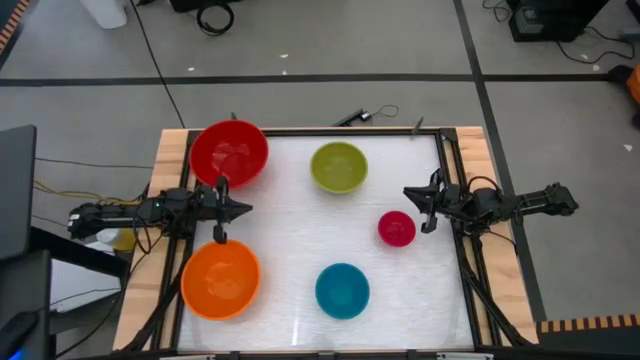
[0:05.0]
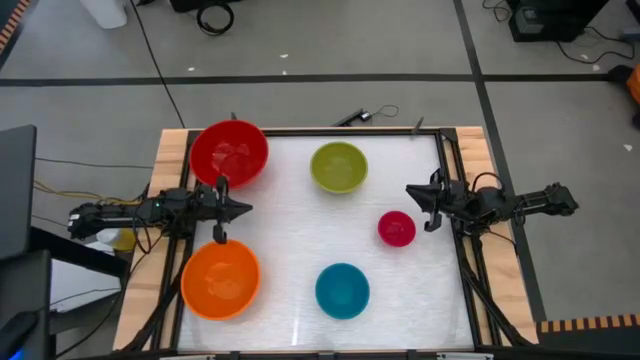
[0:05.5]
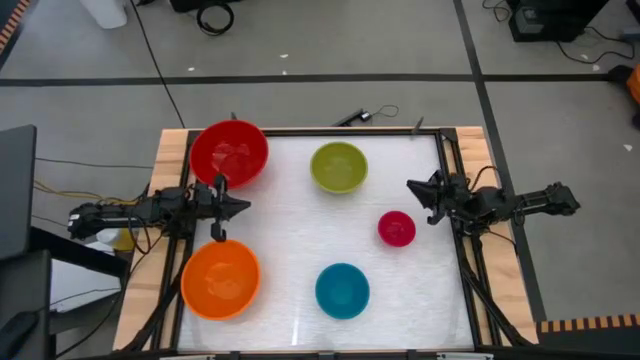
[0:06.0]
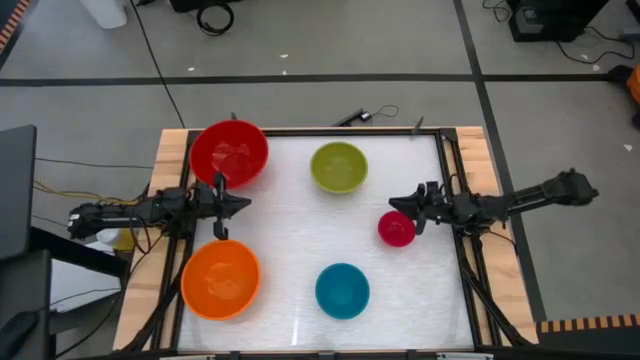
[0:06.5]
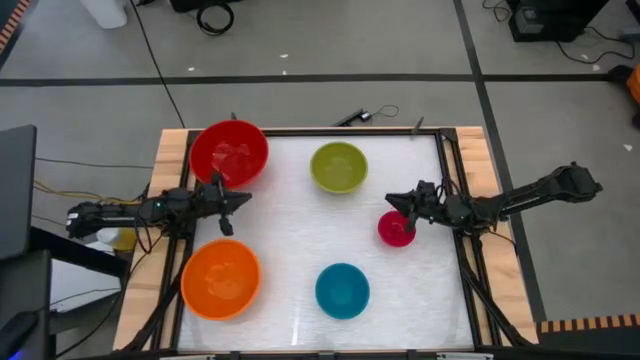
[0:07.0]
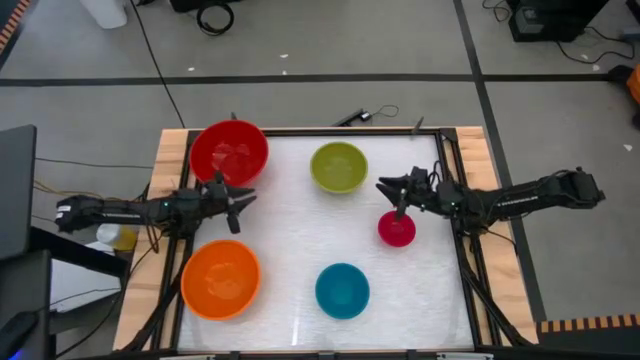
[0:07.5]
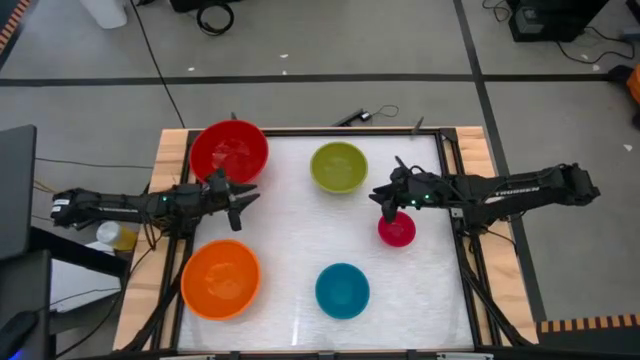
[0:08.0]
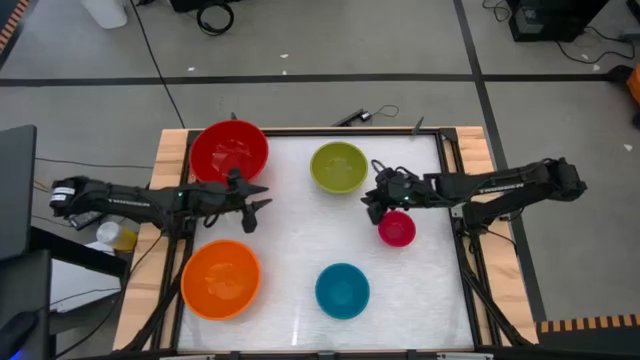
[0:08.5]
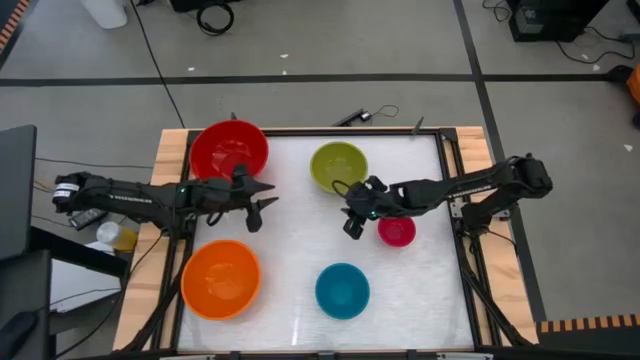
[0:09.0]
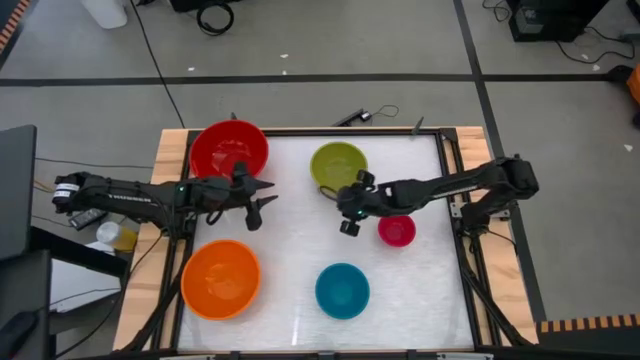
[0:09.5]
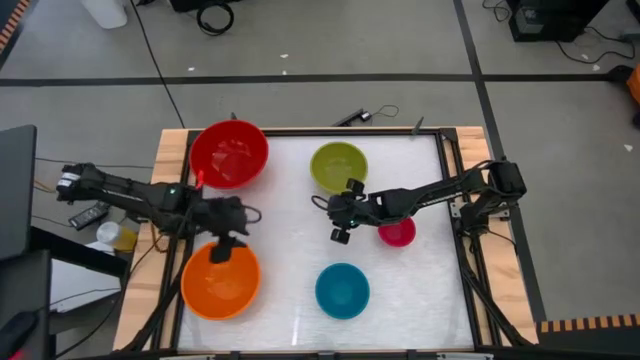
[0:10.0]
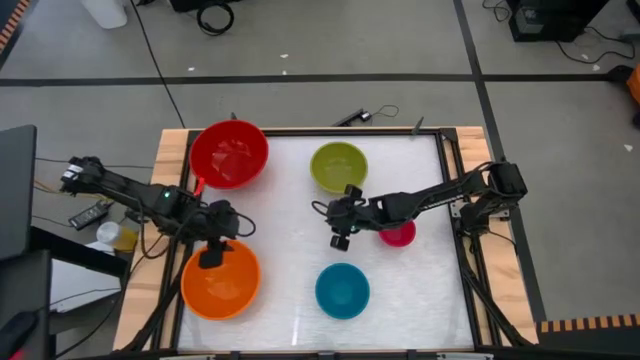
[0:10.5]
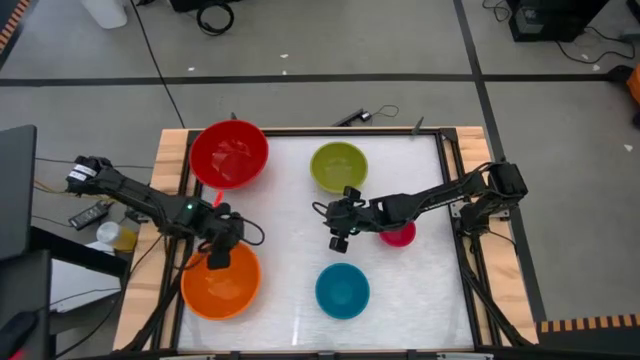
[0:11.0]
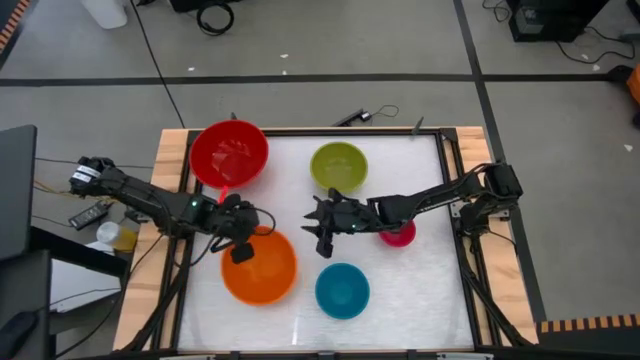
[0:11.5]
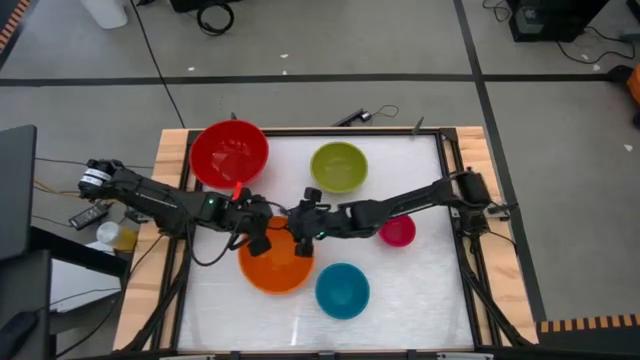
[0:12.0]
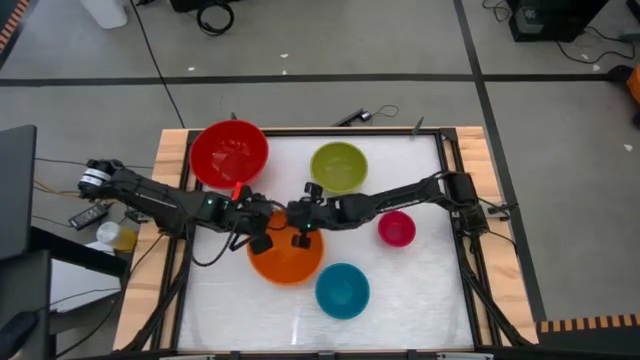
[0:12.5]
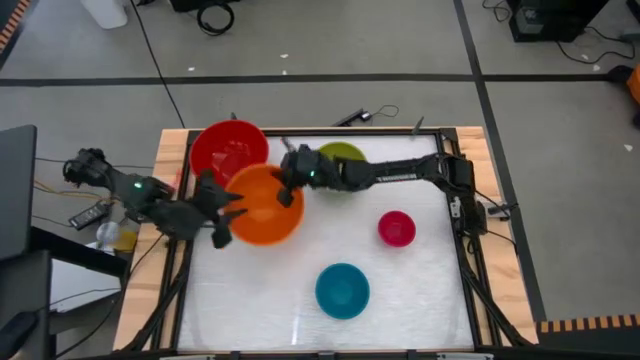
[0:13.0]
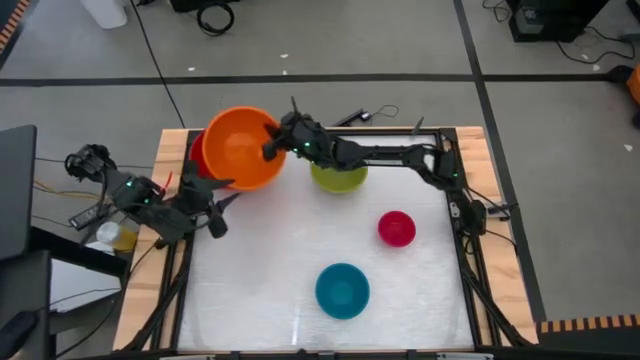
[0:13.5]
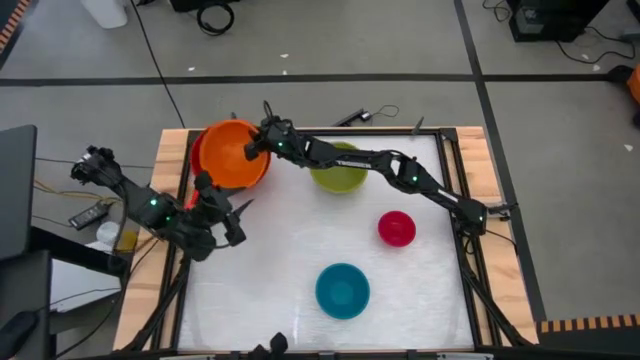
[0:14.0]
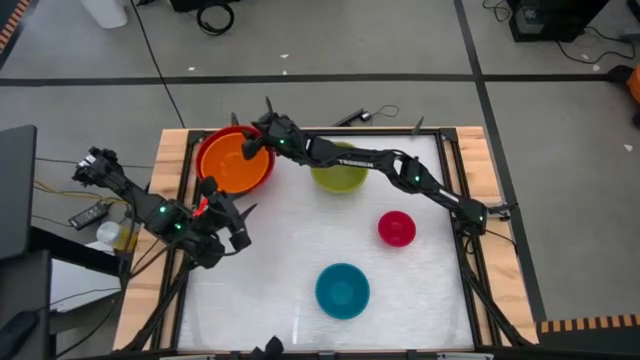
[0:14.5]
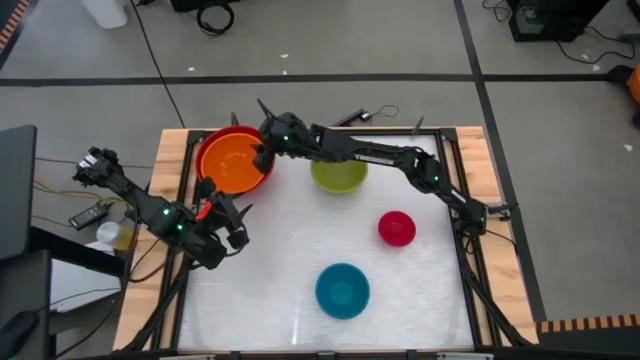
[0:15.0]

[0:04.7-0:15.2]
Stack the orange bowl into the red bowl

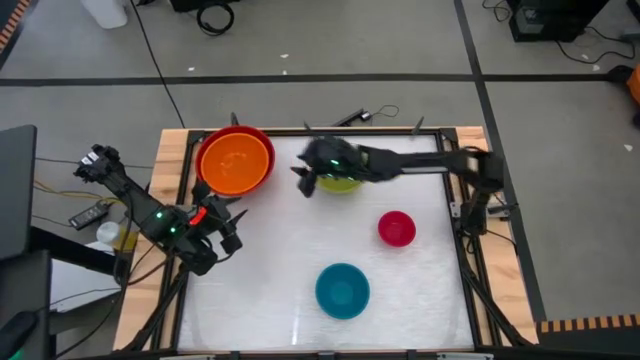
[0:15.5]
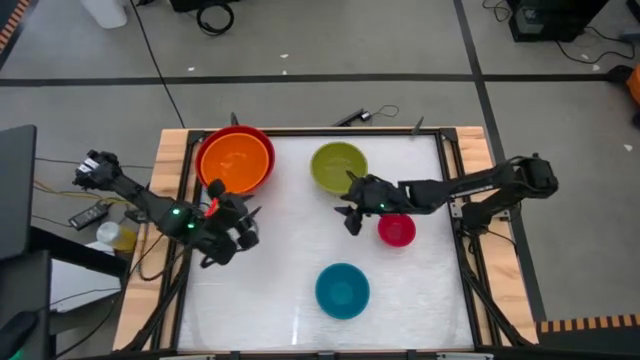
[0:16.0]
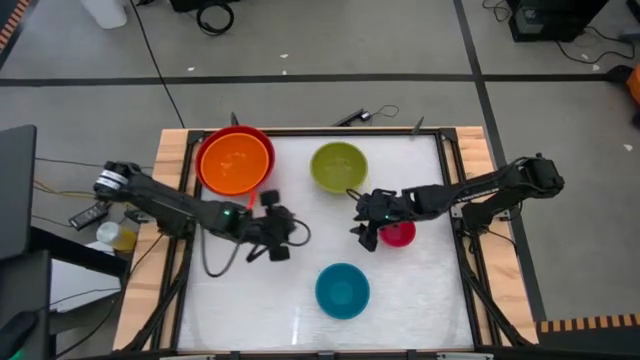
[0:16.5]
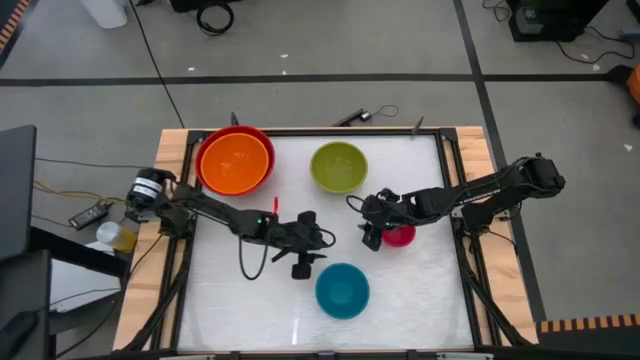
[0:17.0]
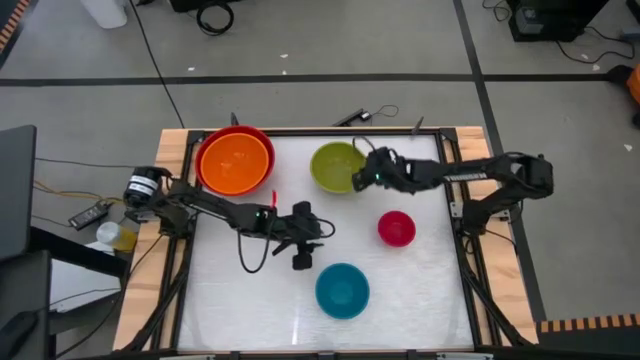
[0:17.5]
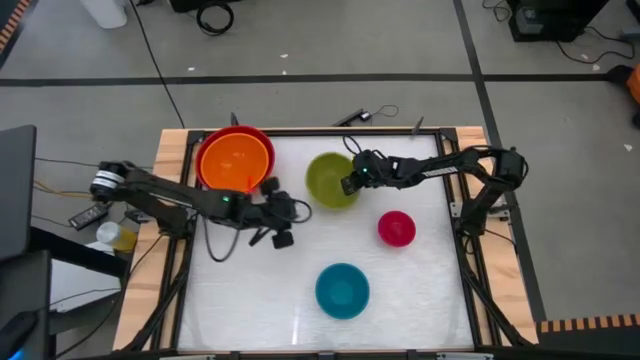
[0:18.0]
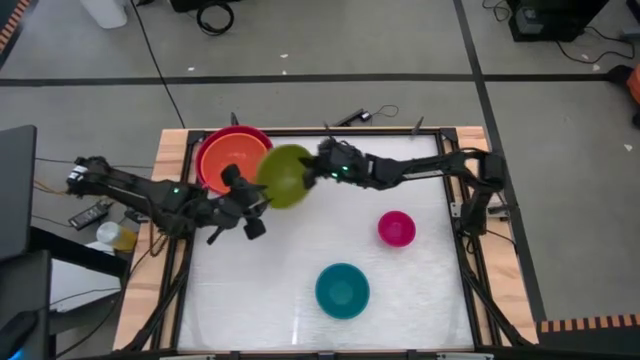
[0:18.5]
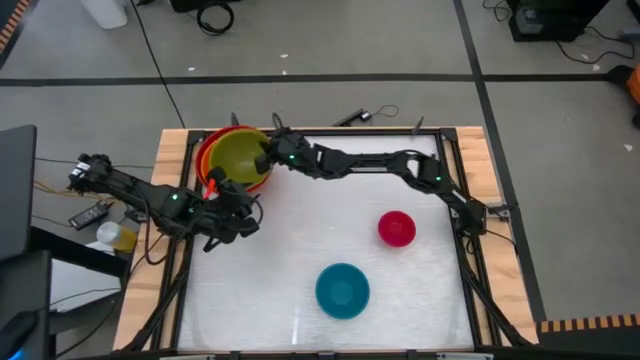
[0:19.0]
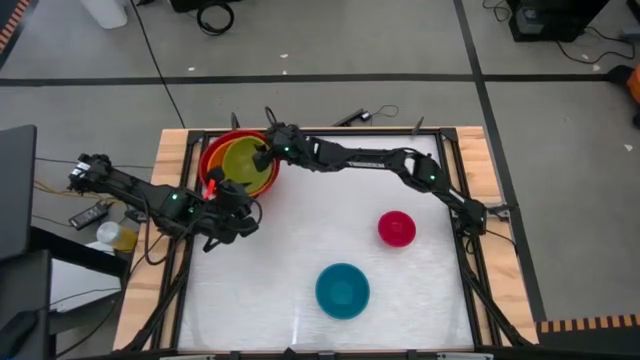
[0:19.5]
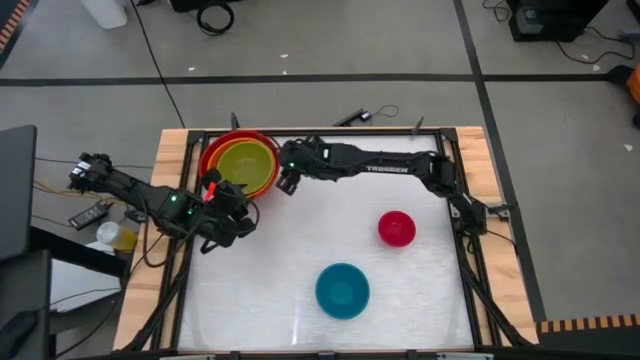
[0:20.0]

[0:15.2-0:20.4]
Stack the green bowl into the orange bowl

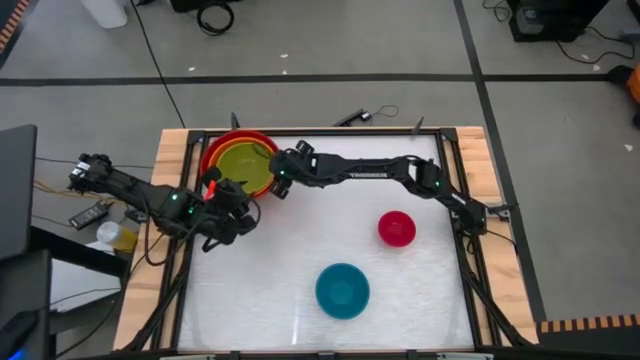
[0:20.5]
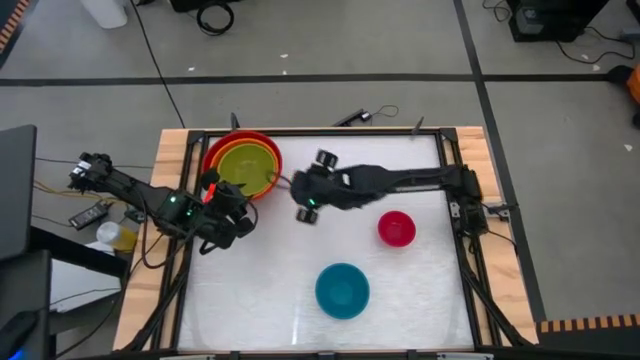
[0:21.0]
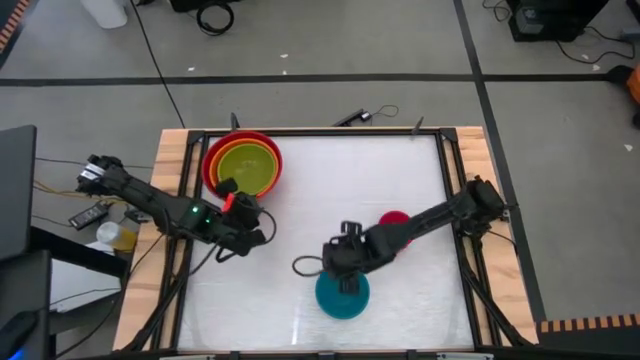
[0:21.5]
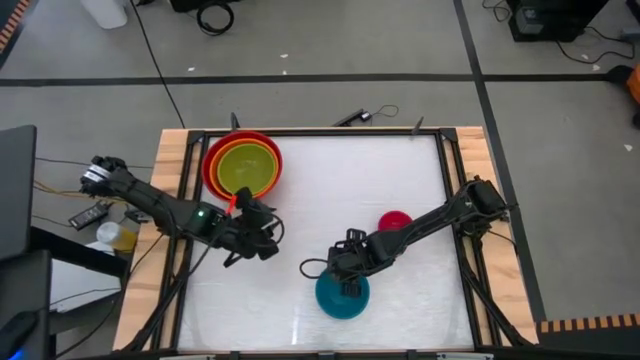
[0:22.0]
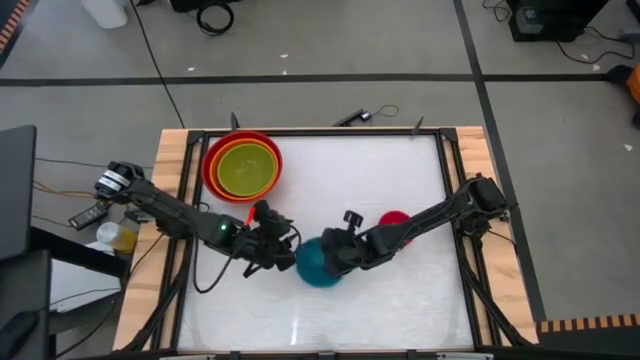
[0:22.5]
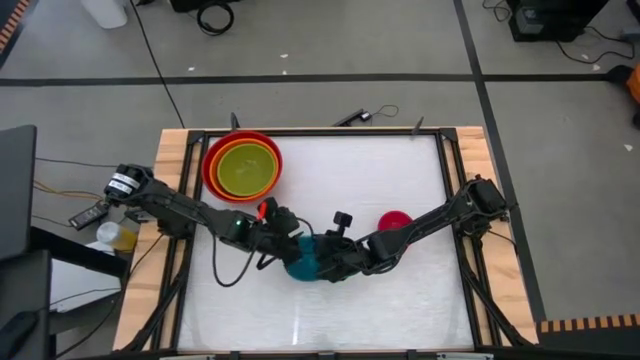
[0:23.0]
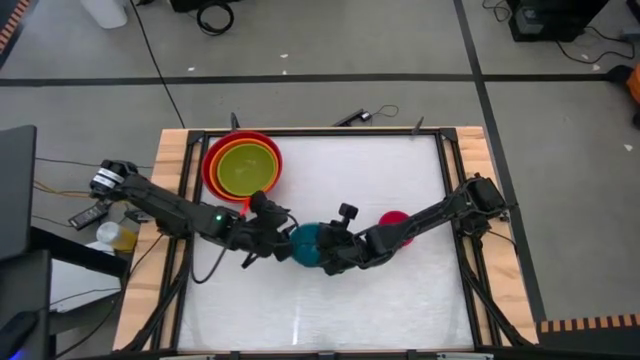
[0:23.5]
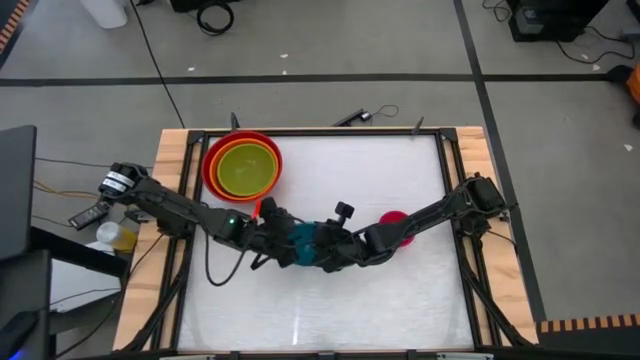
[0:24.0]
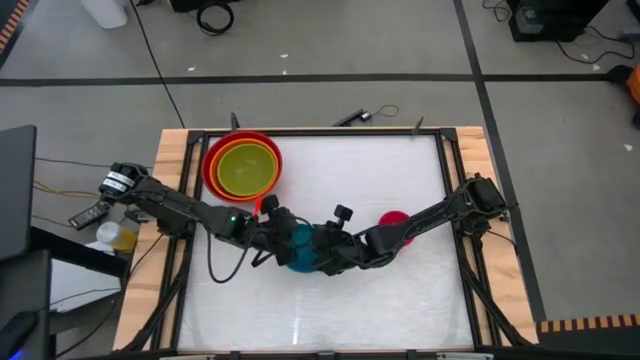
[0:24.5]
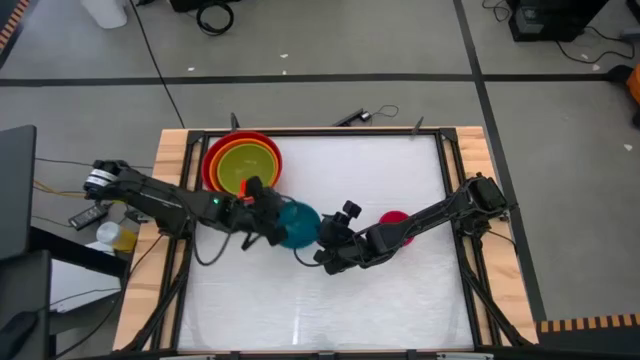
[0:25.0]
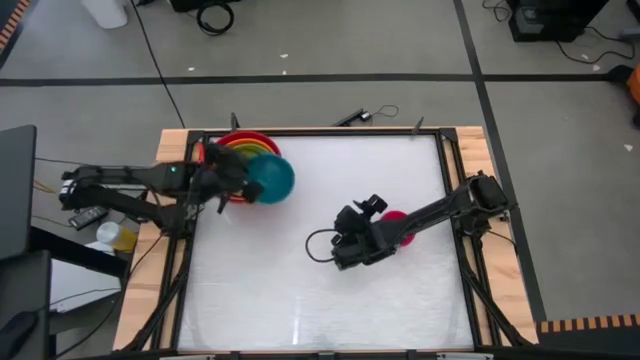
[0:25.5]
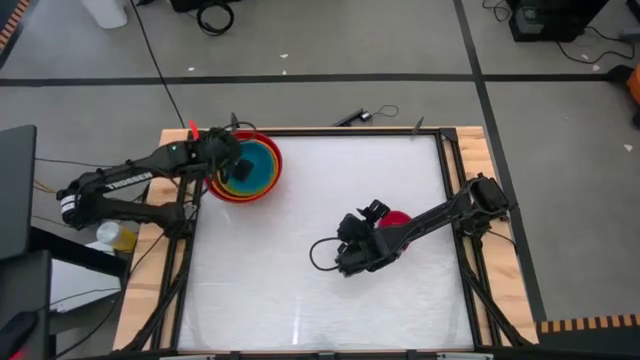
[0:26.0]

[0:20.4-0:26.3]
Stack the blue bowl into the green bowl
